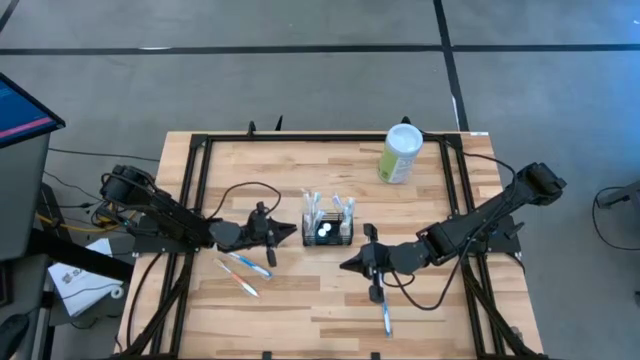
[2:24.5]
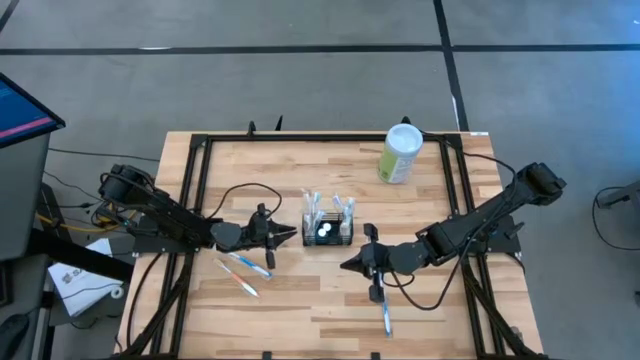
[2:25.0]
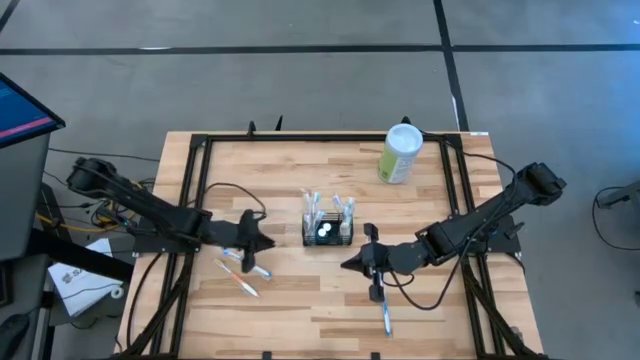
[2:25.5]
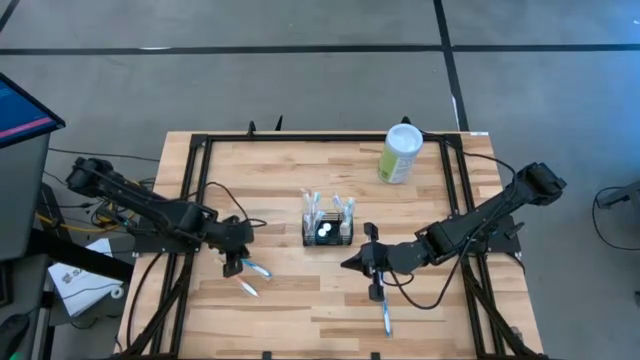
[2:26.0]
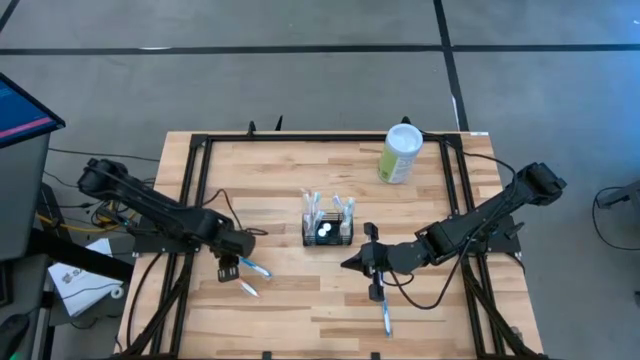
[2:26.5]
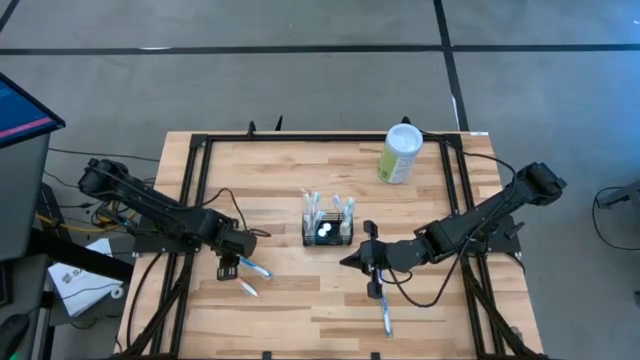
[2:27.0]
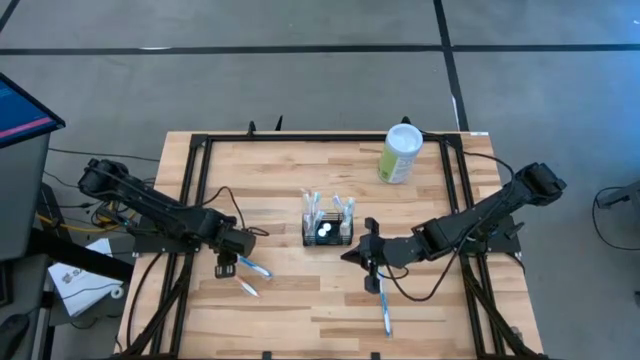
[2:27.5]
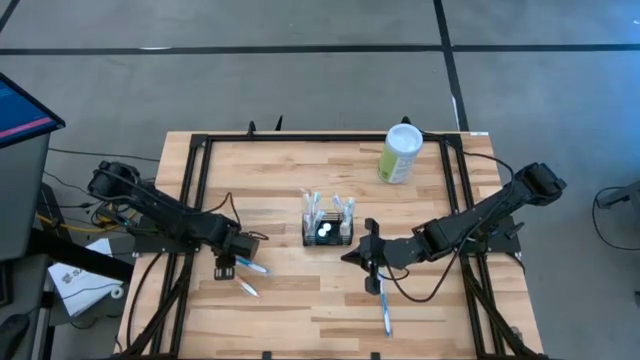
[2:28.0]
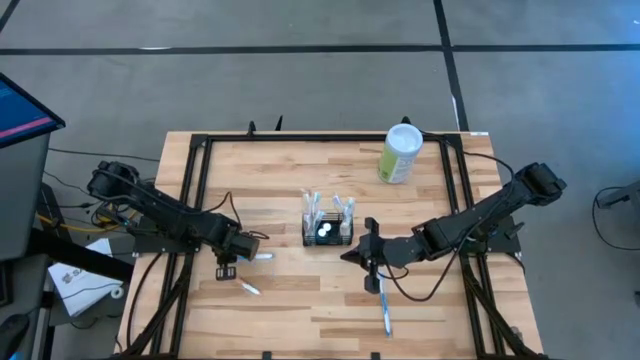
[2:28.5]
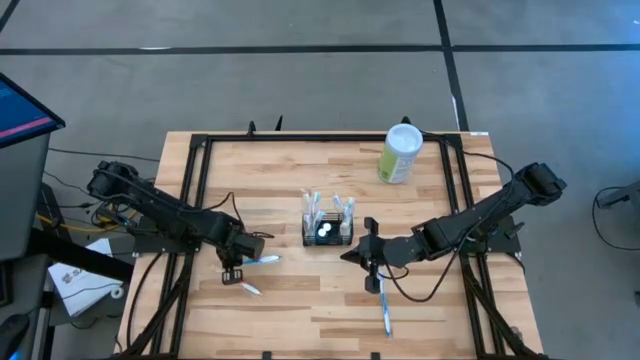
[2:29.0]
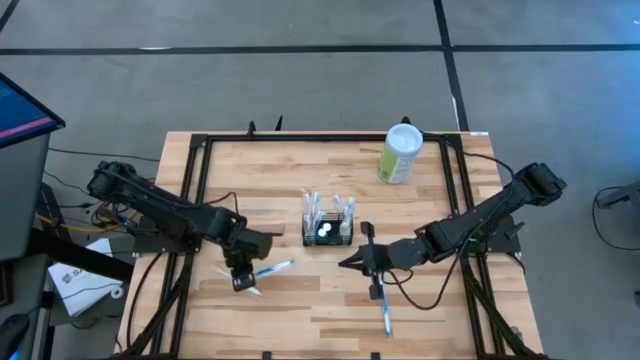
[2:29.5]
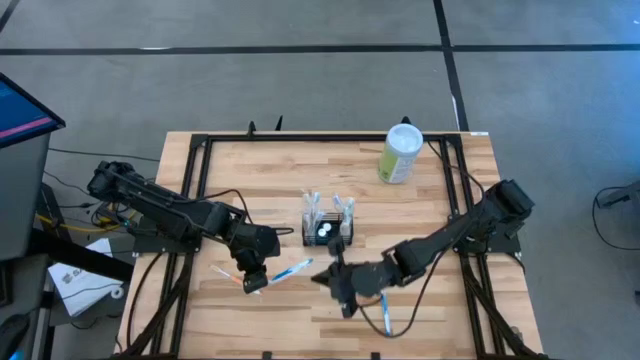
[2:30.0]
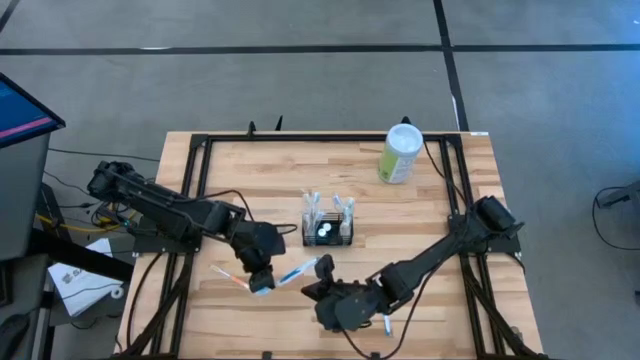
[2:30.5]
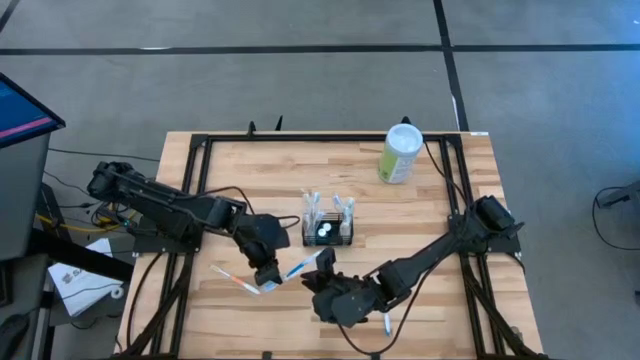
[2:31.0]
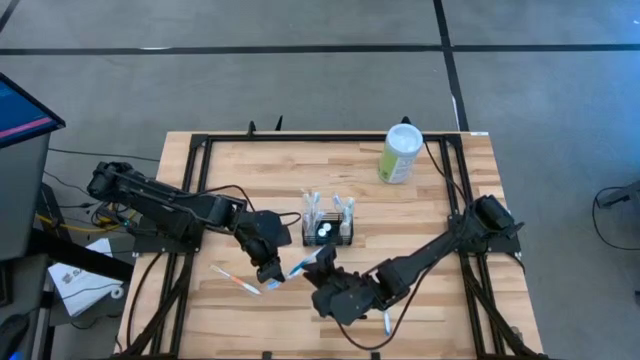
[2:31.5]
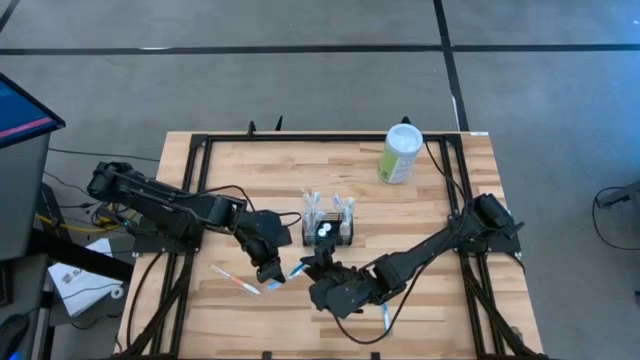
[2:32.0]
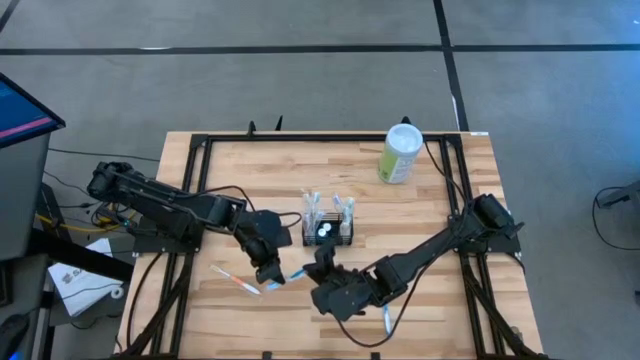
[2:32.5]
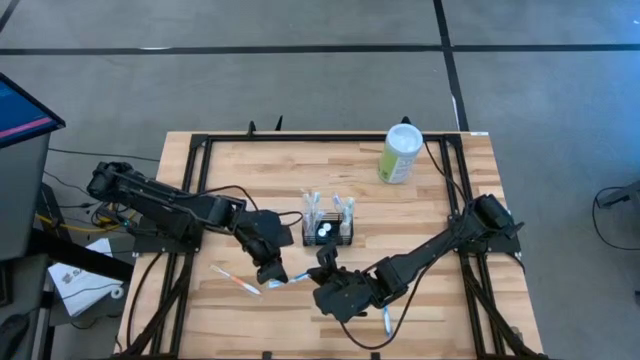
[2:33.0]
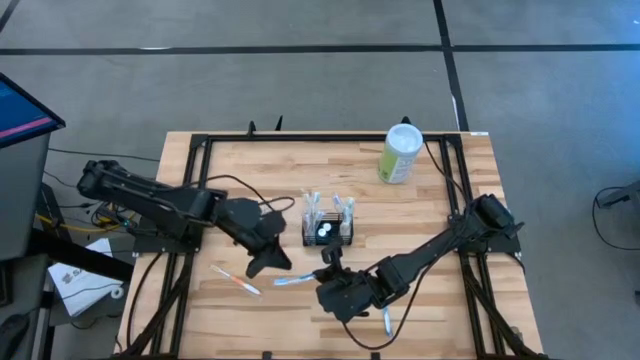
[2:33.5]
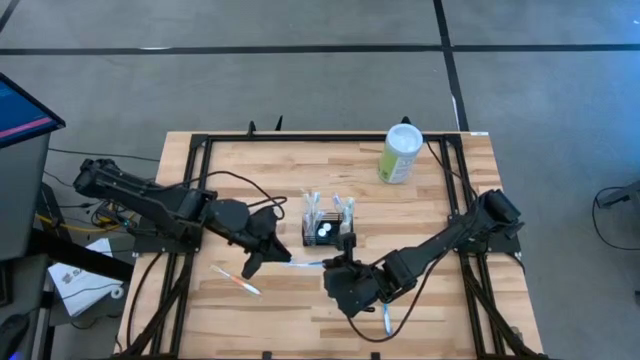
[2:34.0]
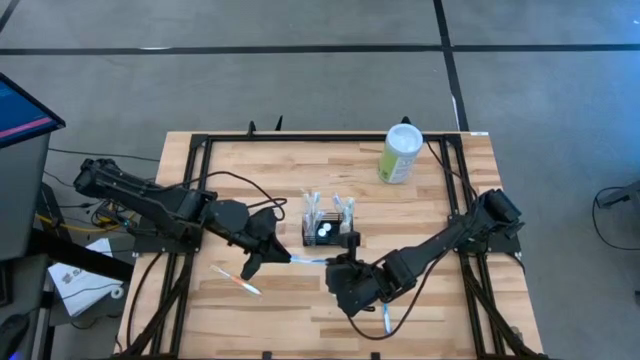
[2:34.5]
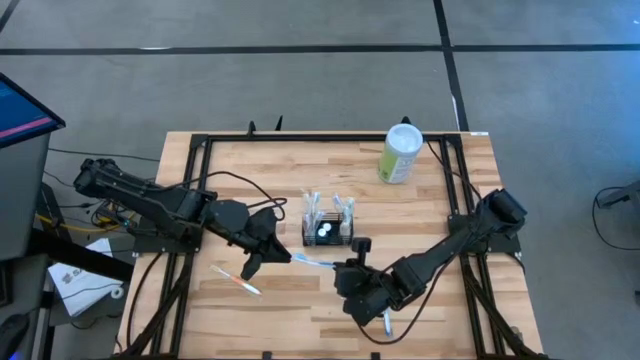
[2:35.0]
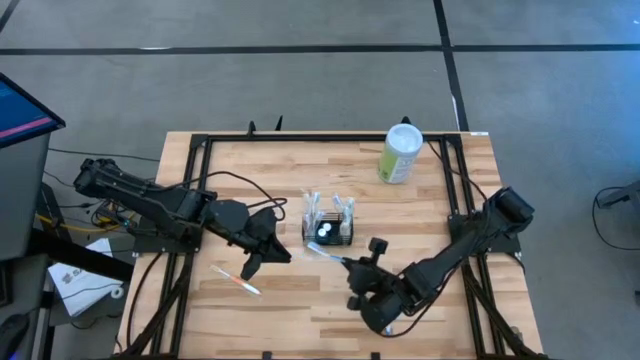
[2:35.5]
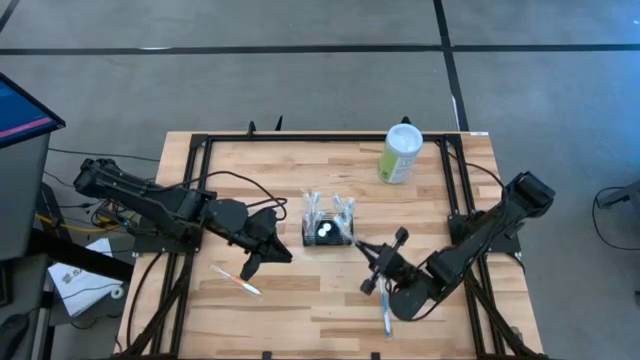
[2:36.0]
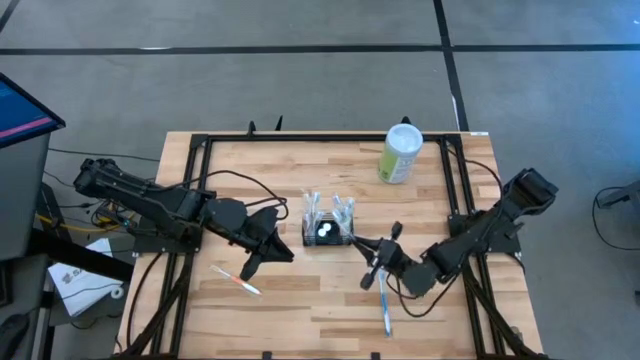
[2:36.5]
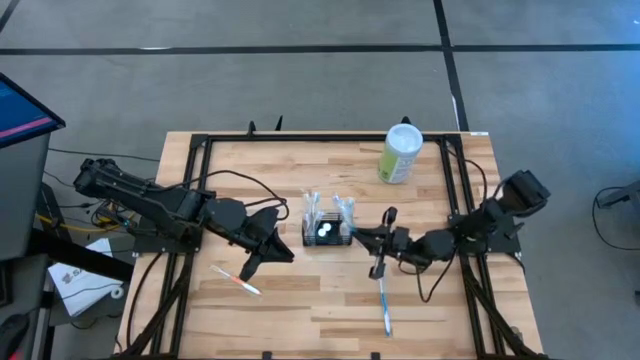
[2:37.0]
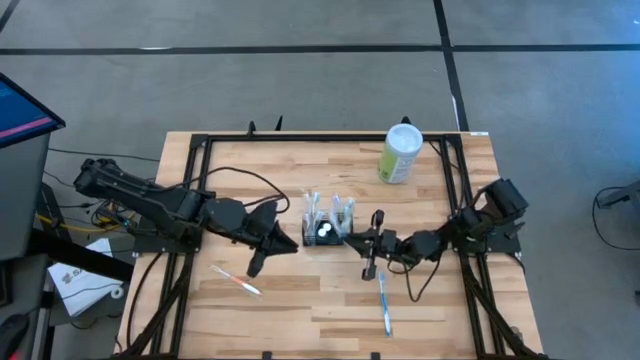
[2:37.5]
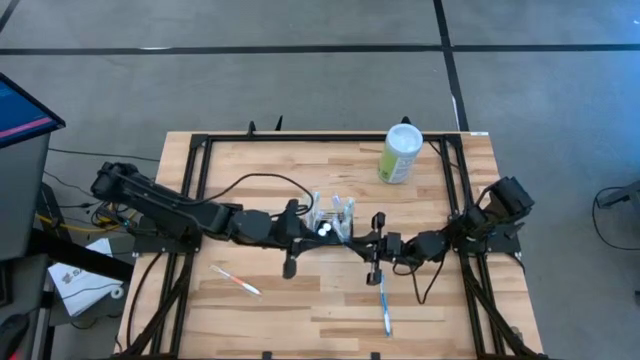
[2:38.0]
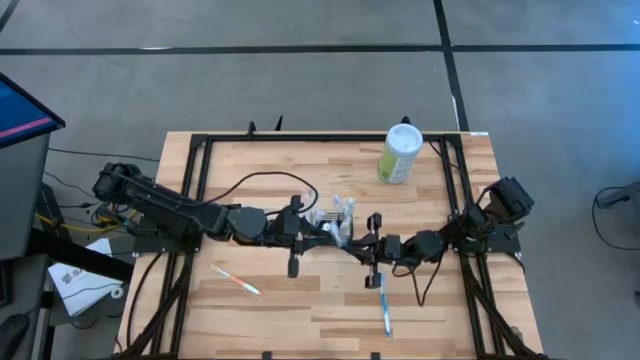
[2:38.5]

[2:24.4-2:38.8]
Task: Pick & Place toothbrushing station
Put the left blue toothbrush into the right compartment of the organizer

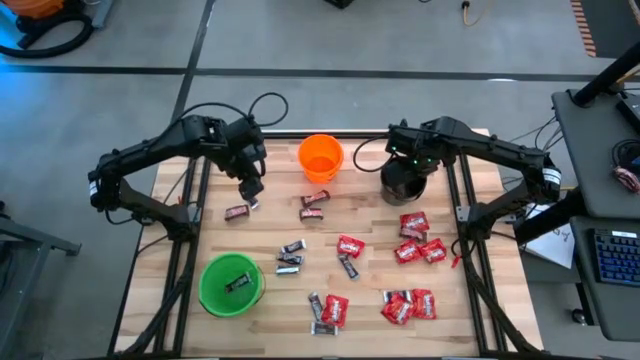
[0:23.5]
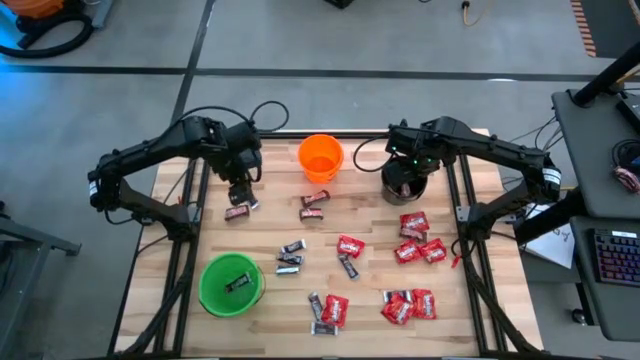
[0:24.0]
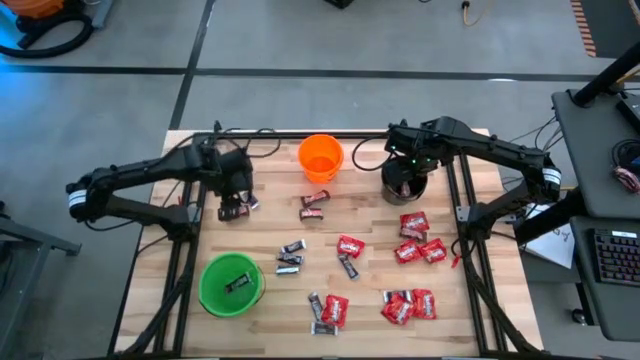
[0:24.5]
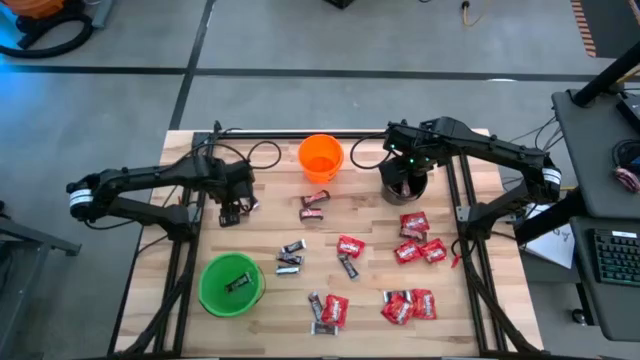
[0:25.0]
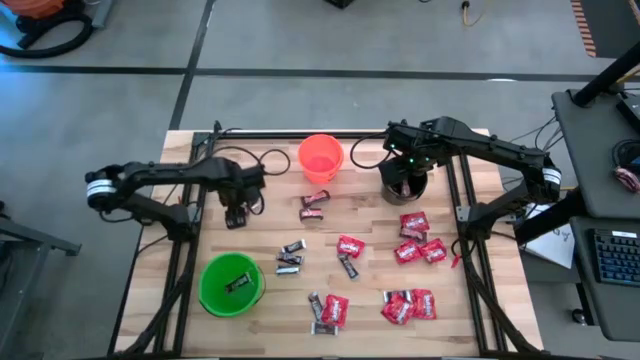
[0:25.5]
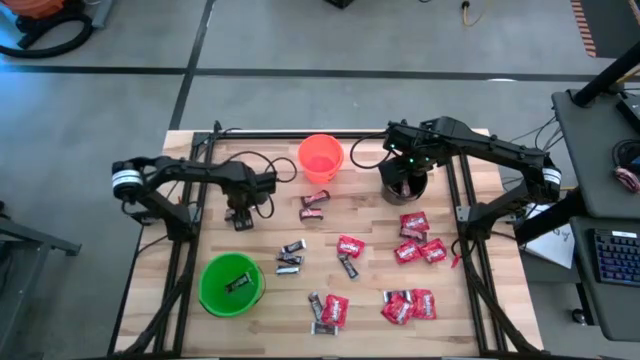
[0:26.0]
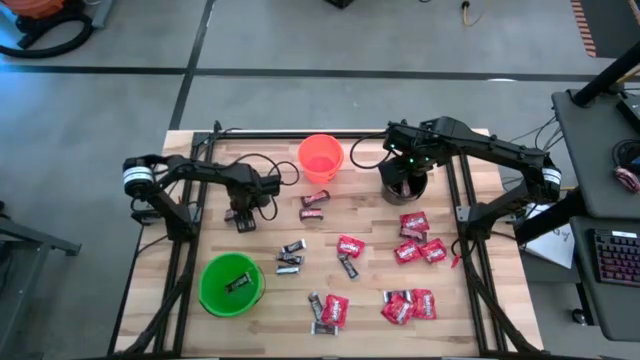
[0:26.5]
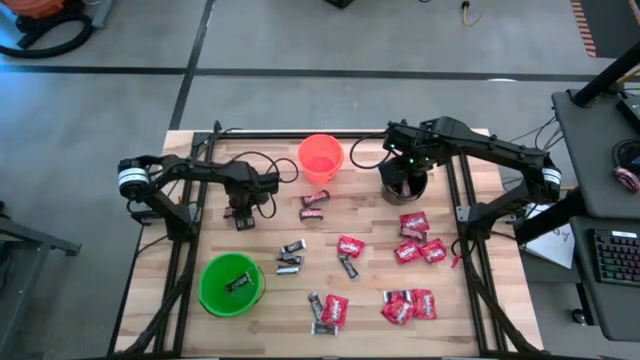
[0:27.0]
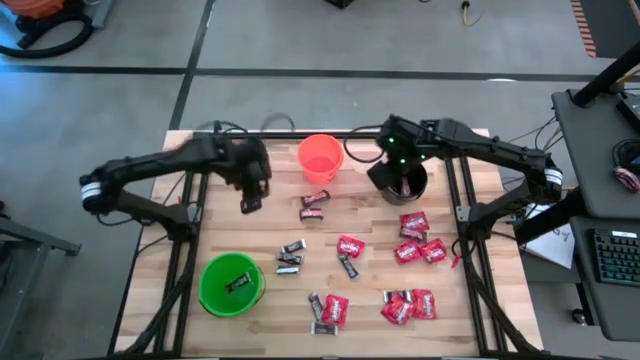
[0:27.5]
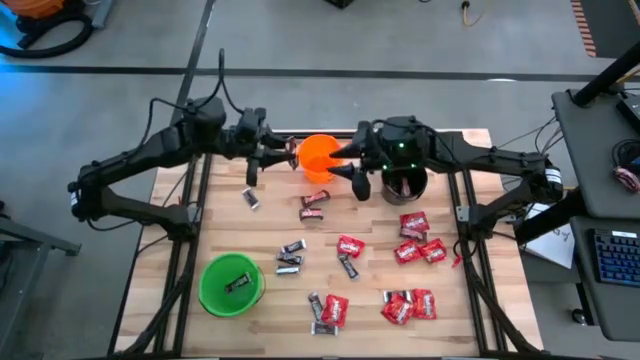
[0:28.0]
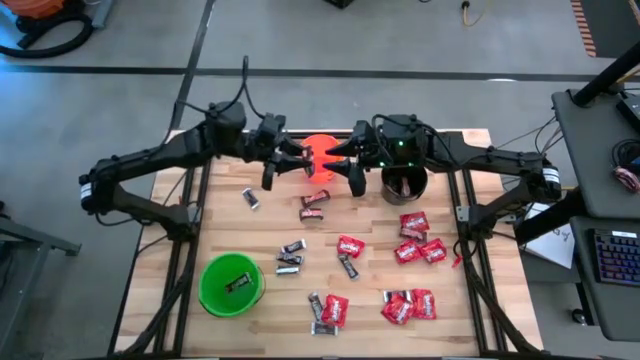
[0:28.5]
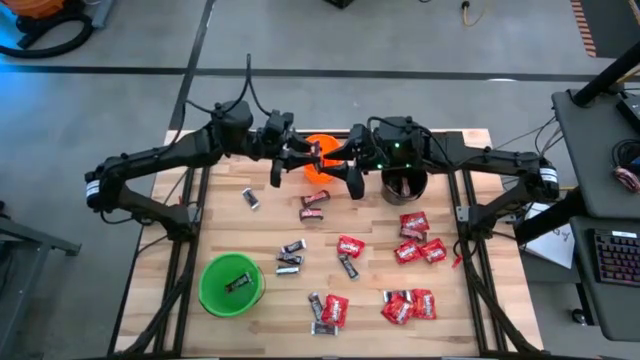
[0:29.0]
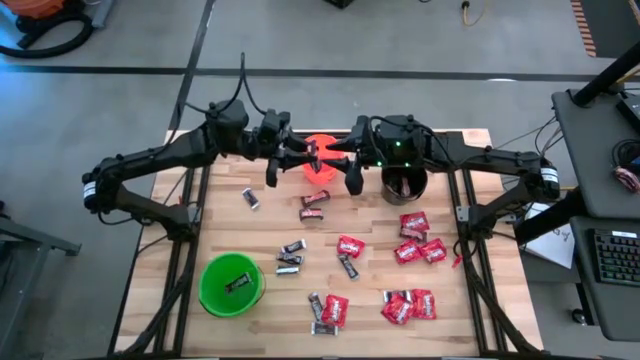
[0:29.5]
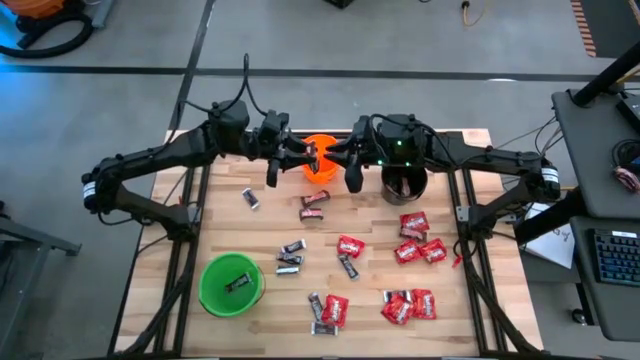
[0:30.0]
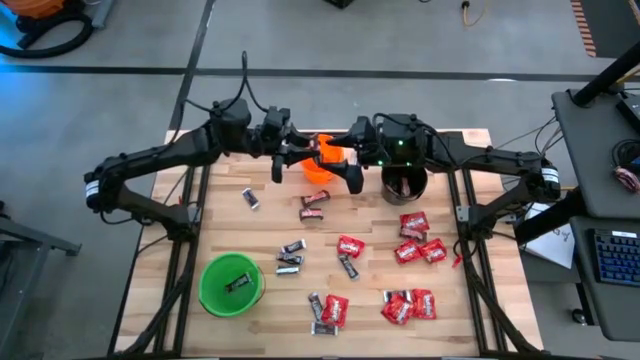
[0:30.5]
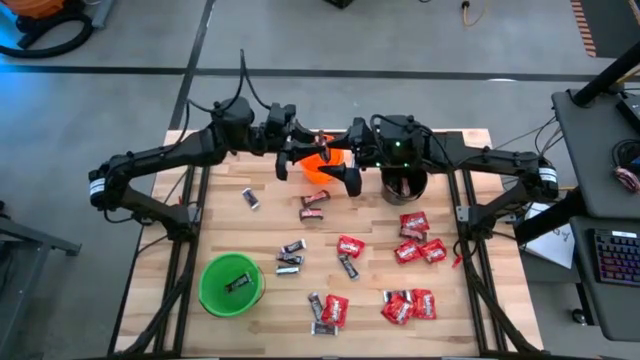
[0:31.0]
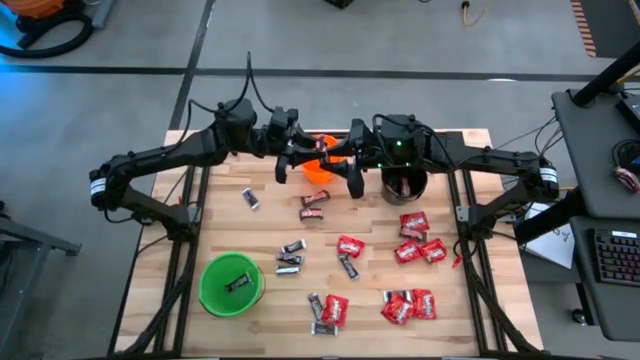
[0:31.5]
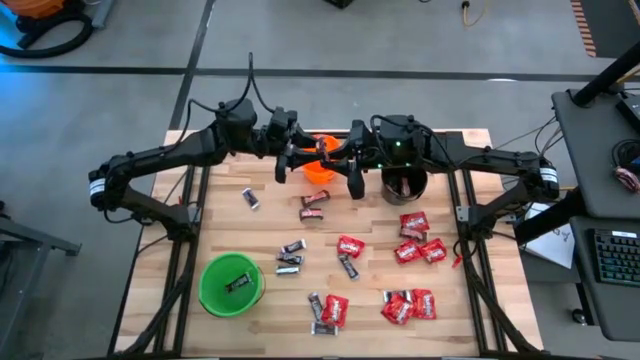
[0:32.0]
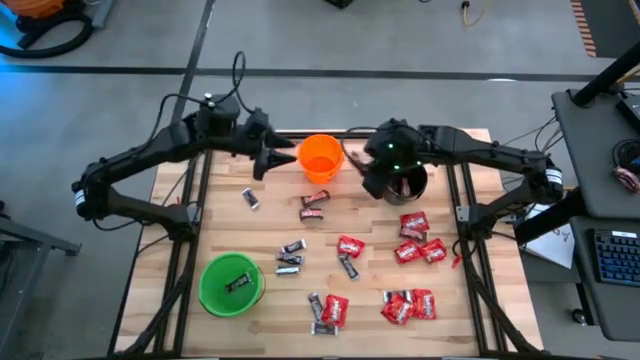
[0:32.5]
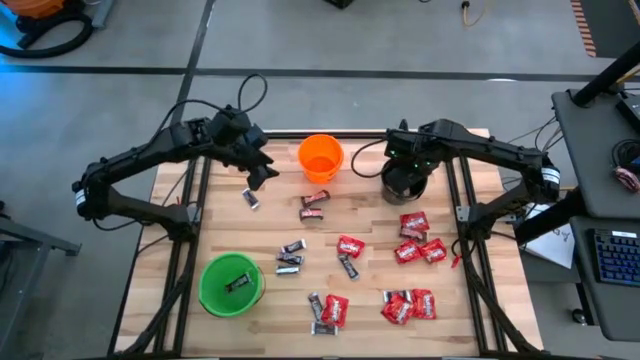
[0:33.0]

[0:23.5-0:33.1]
Task: Sort candy
Put the brown chocolate into the black bucket
